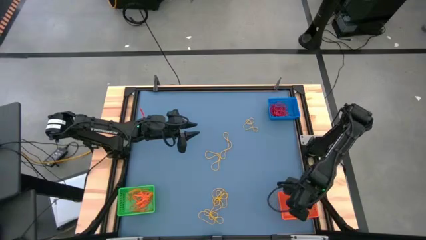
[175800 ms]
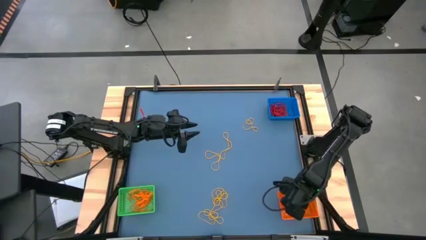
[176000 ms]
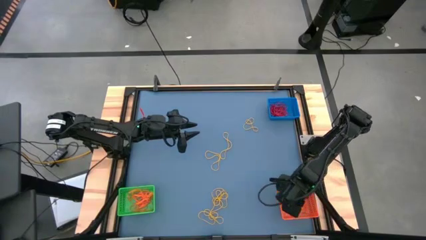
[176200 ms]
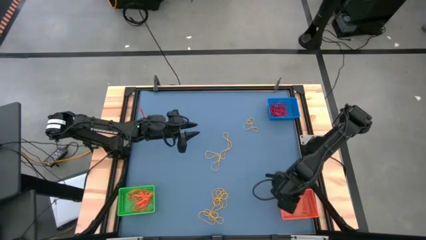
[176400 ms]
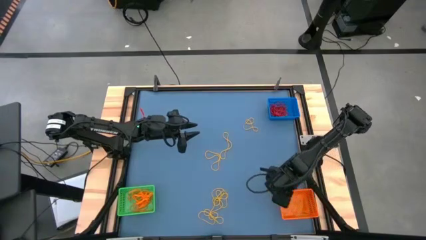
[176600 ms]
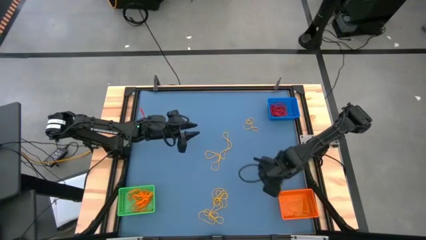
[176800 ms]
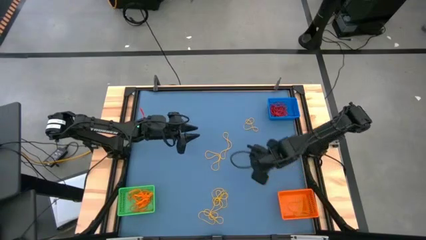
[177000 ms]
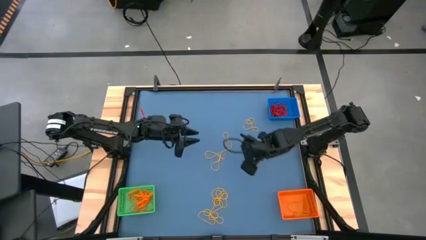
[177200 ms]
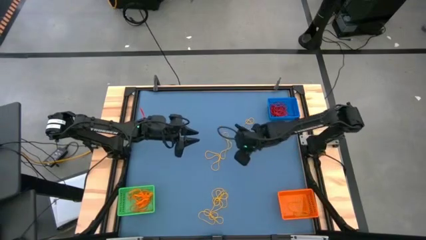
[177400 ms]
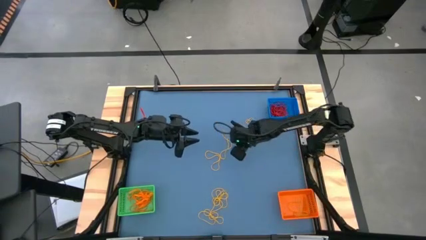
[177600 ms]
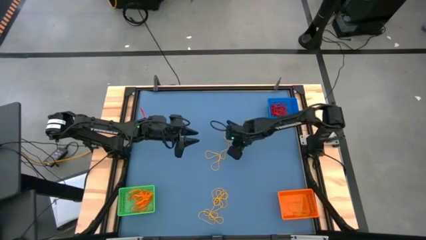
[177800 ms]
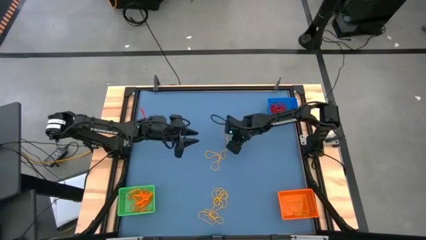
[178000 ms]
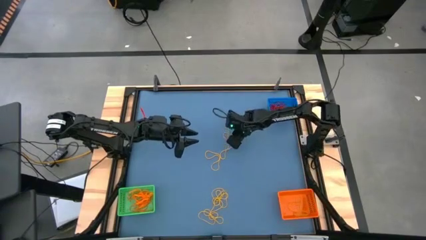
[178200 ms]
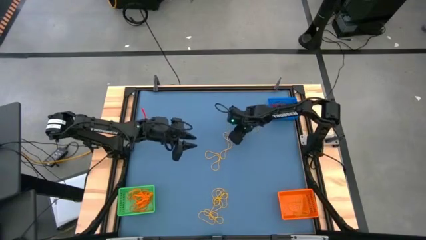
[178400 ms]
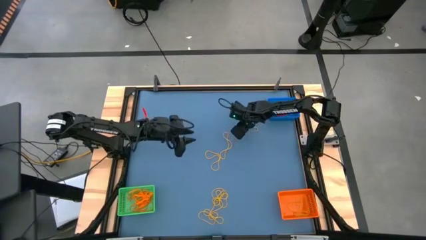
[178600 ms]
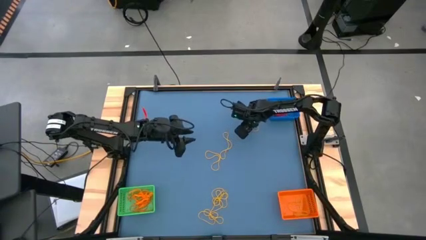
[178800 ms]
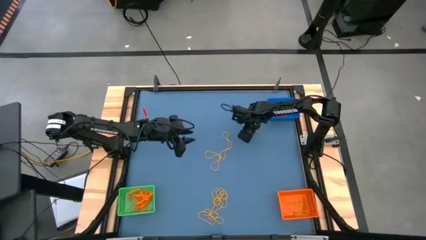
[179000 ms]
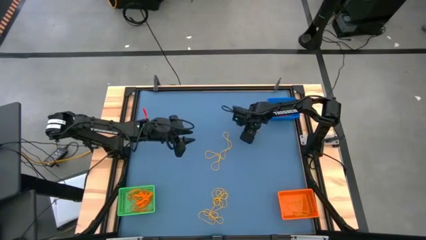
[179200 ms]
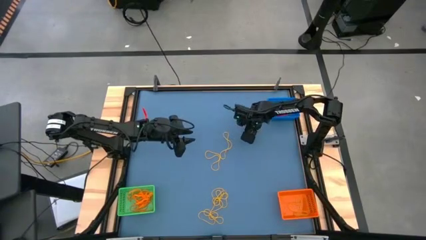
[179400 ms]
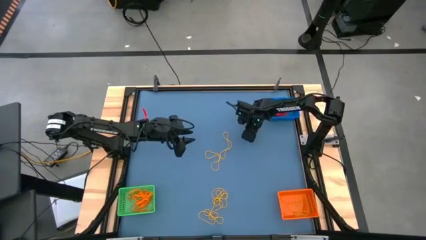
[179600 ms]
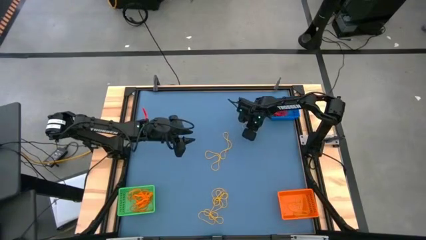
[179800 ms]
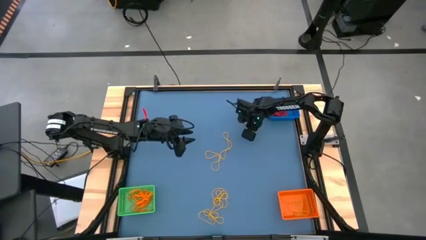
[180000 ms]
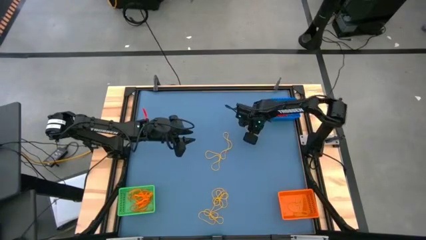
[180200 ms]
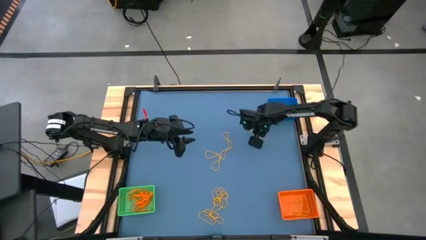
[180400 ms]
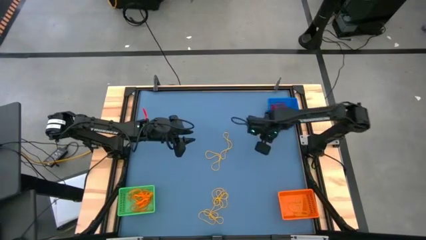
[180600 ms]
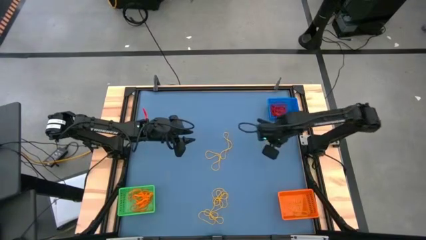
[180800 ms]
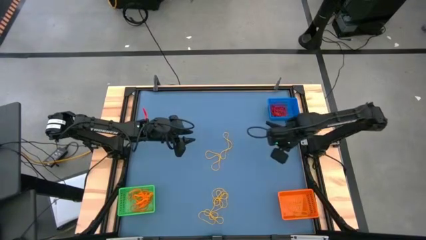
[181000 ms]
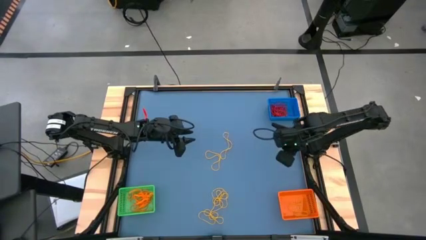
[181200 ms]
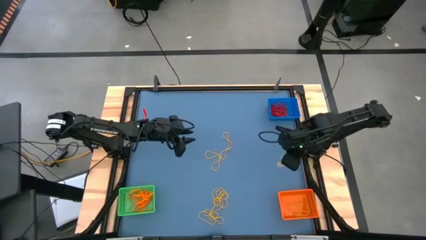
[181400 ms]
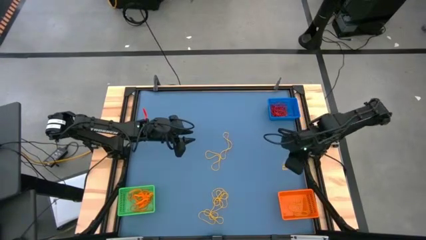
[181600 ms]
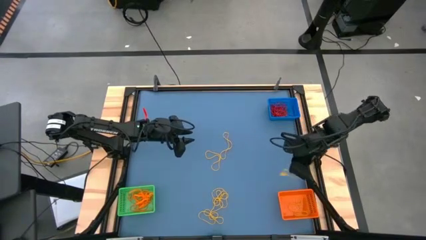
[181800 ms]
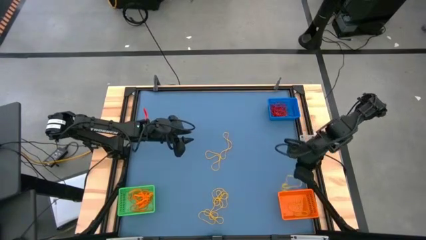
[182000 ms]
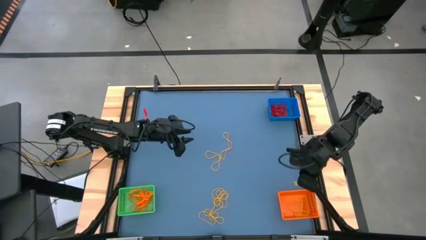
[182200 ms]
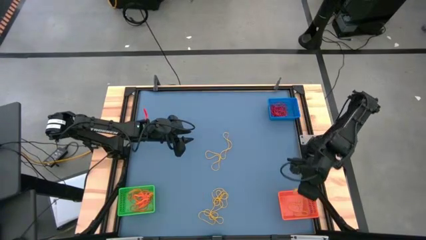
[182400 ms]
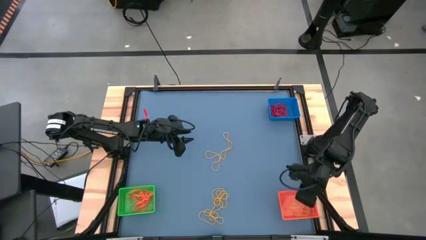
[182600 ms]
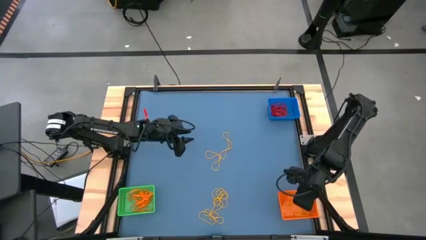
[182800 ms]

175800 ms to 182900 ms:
Task: Sort rubber bands into baskets
Put the yellow rubber band into the orange bin

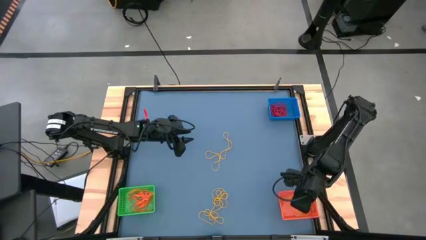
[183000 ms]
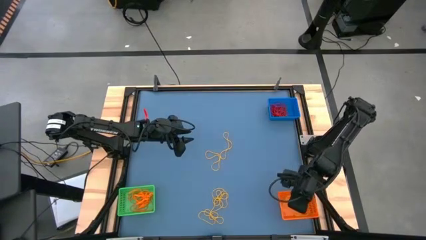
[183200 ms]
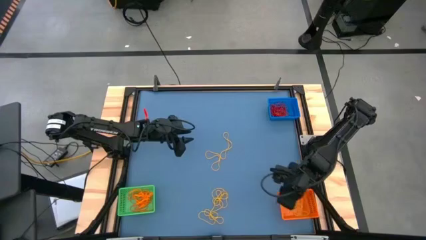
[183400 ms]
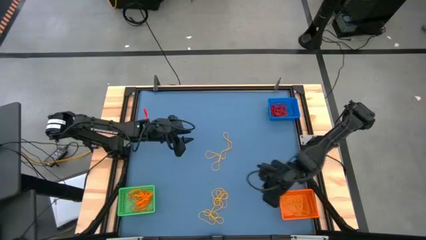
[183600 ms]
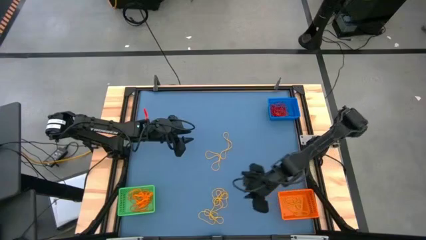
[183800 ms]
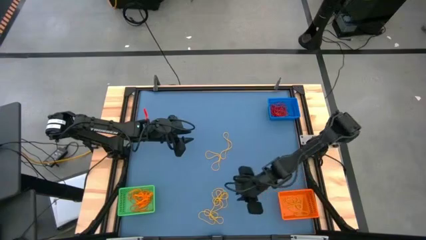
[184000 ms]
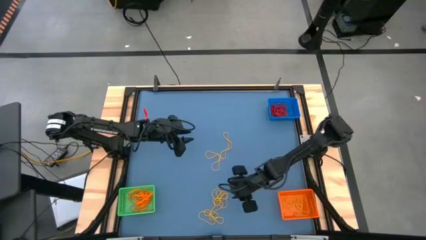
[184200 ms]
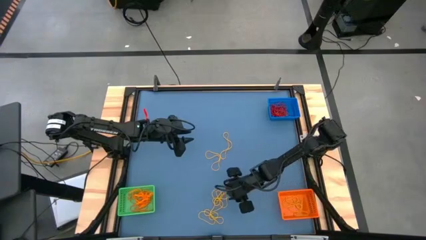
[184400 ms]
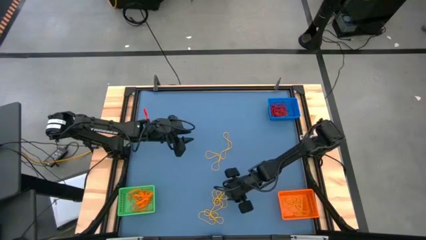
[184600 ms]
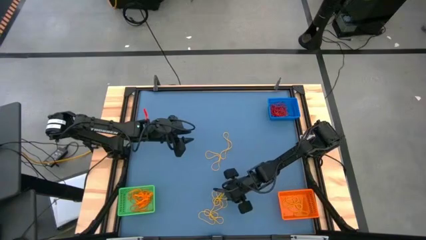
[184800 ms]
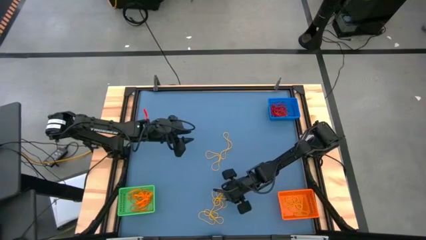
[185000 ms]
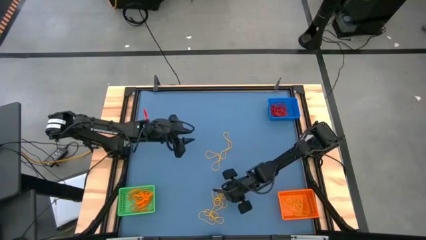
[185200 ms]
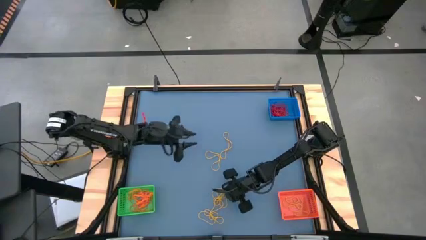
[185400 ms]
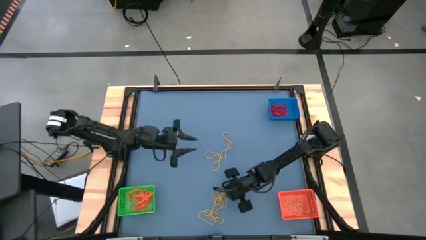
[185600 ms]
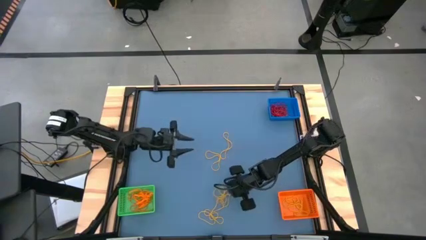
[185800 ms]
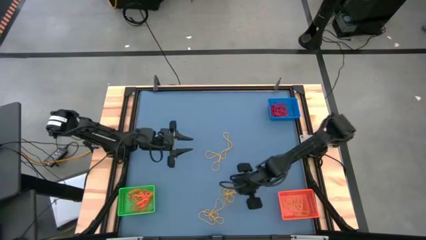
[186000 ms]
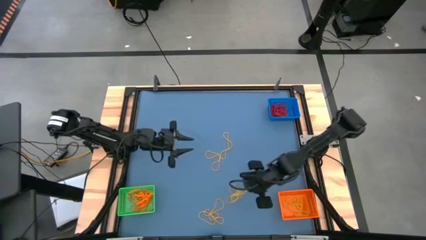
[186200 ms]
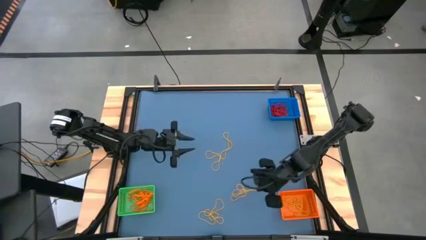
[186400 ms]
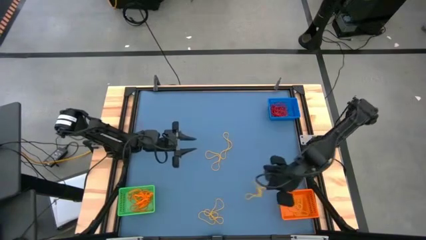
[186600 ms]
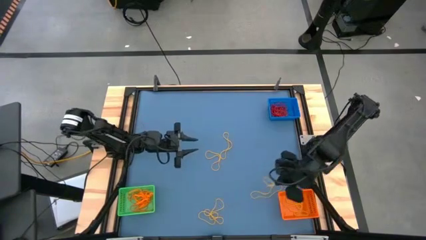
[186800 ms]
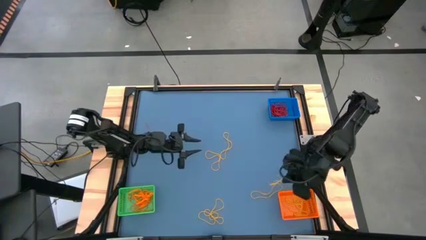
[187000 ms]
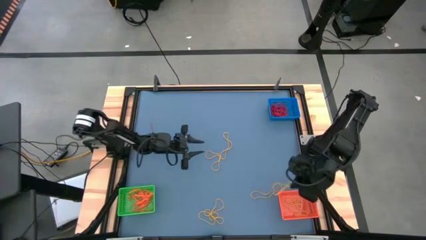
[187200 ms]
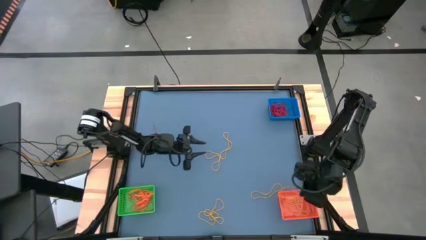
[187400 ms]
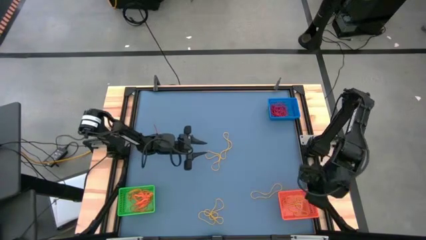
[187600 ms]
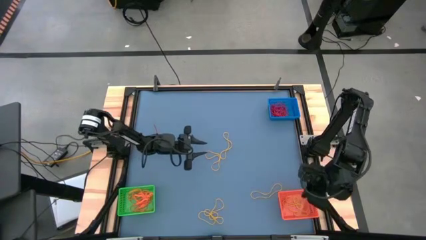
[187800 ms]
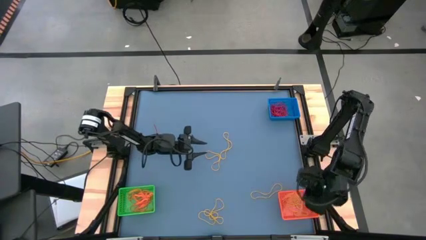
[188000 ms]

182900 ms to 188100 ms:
Put the yellow rubber band into the orange bin

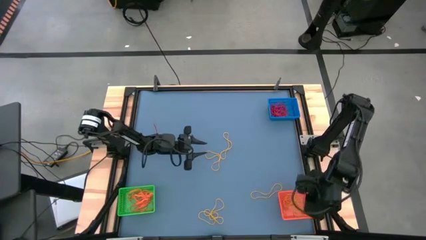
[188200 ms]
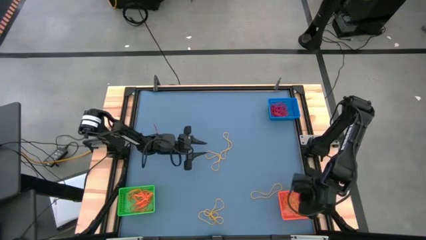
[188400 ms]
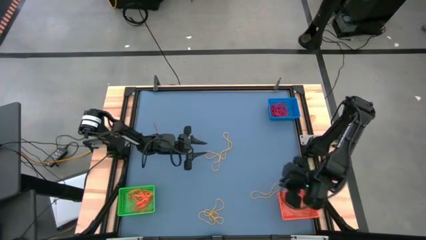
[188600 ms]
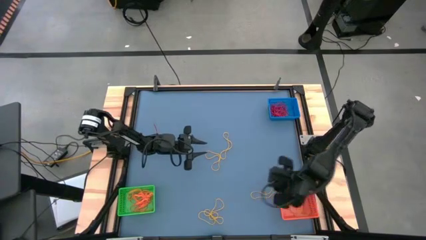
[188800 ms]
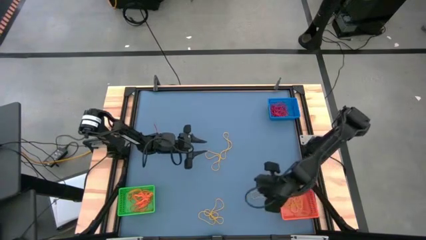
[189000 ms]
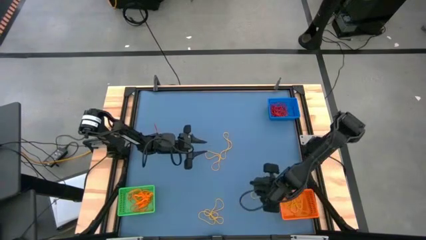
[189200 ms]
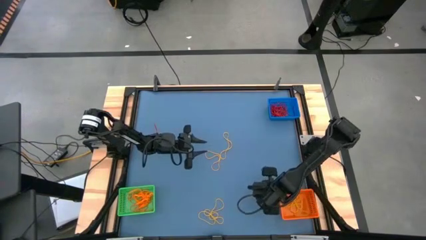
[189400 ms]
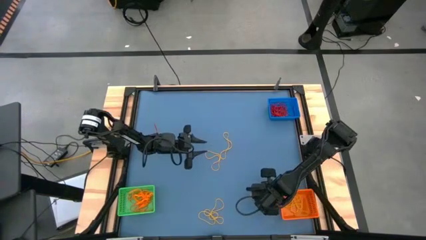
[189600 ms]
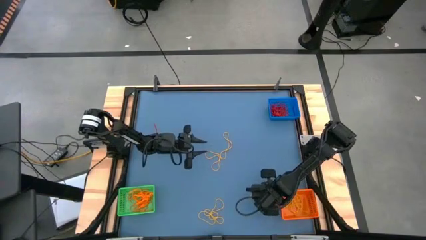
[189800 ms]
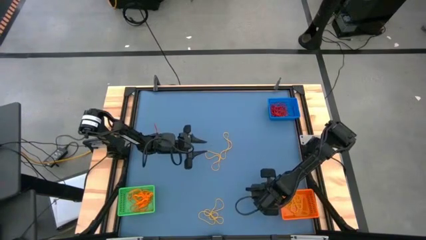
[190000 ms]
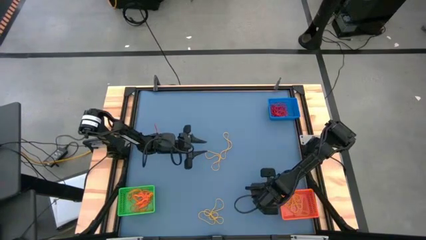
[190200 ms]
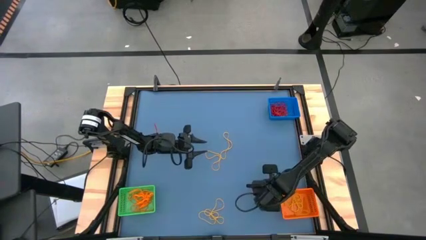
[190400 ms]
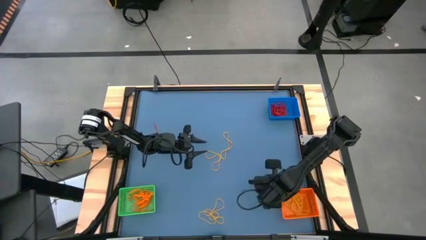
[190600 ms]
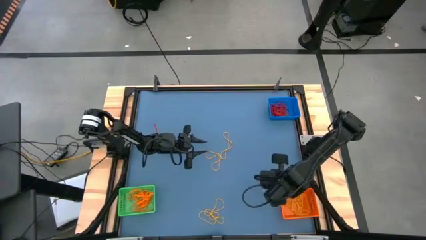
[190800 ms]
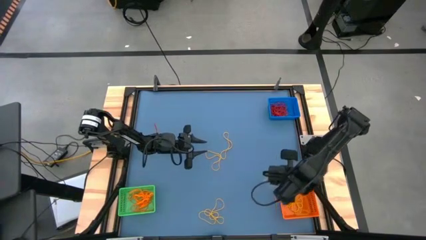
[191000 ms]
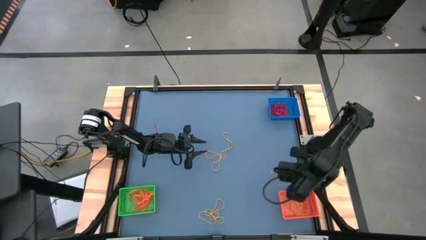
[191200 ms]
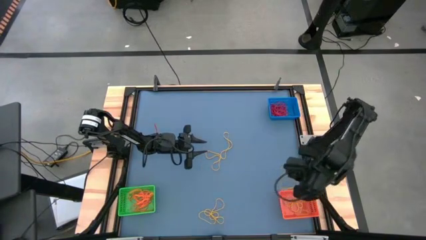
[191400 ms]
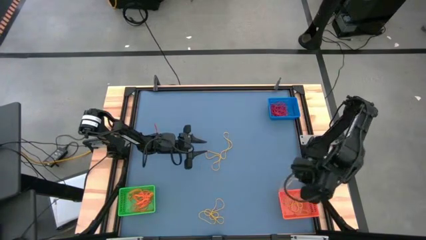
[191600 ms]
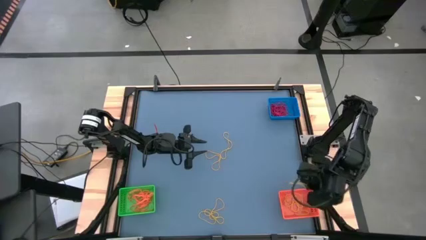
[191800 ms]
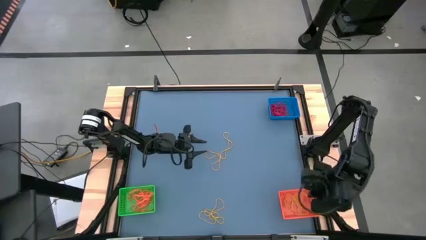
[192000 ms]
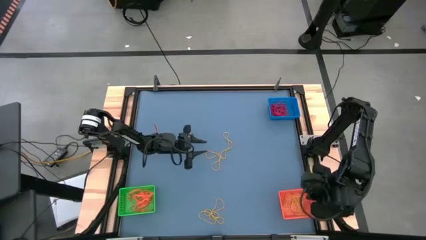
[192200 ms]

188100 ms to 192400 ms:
Put the yellow rubber band into the orange bin
